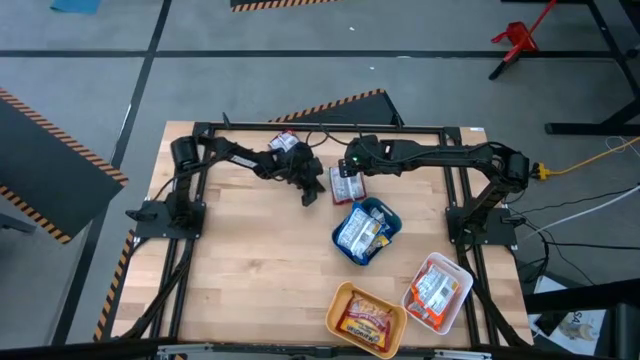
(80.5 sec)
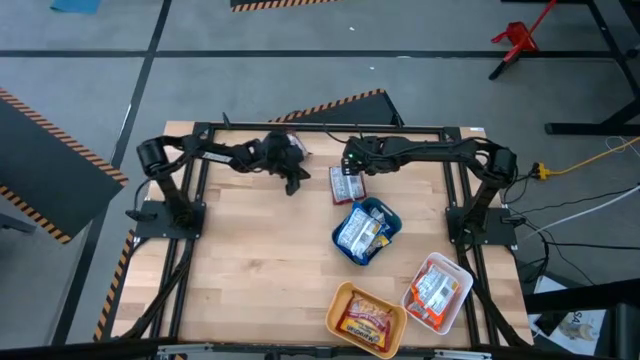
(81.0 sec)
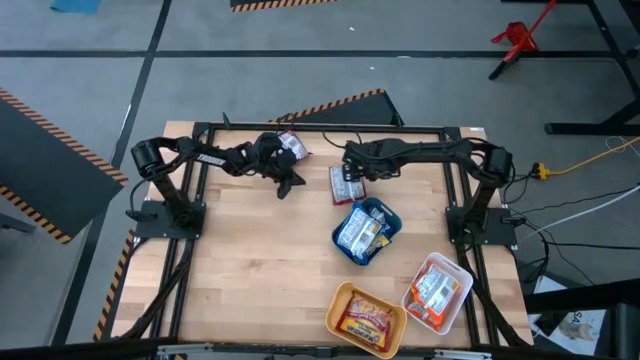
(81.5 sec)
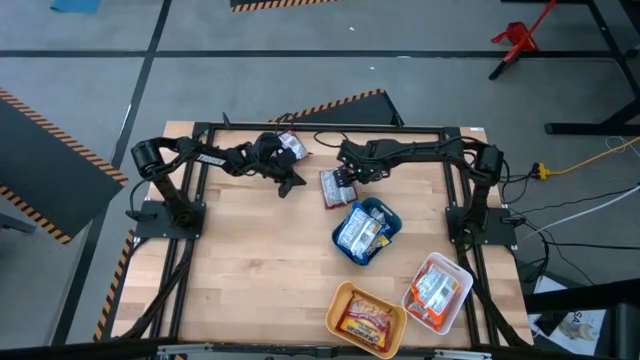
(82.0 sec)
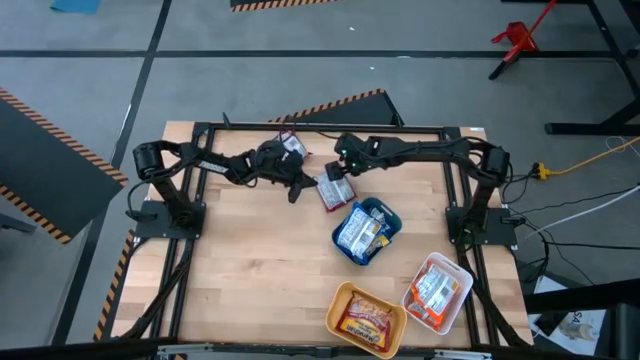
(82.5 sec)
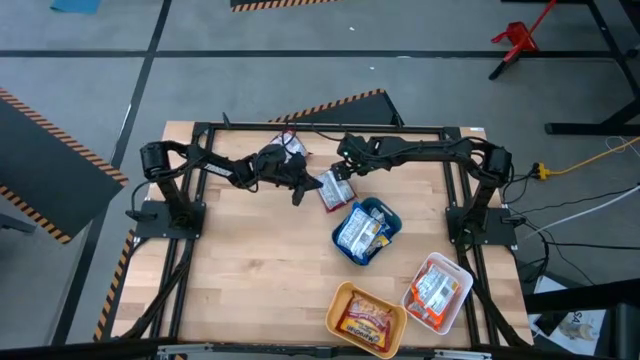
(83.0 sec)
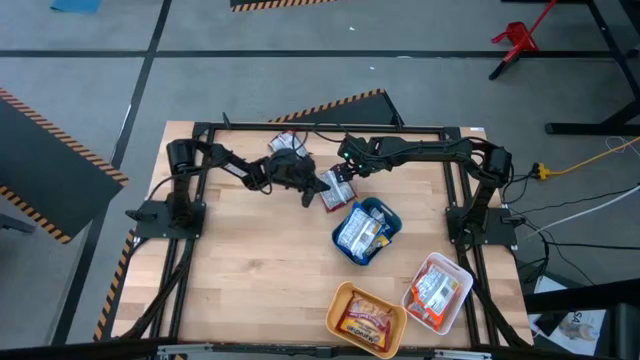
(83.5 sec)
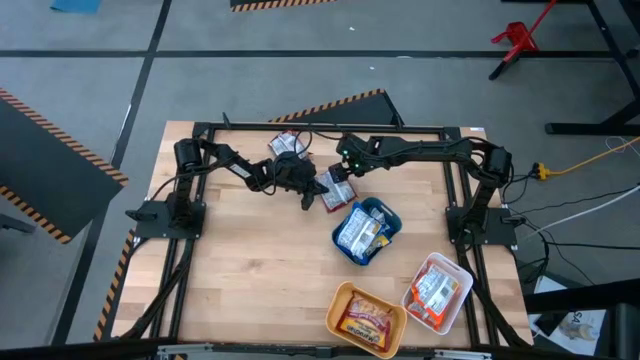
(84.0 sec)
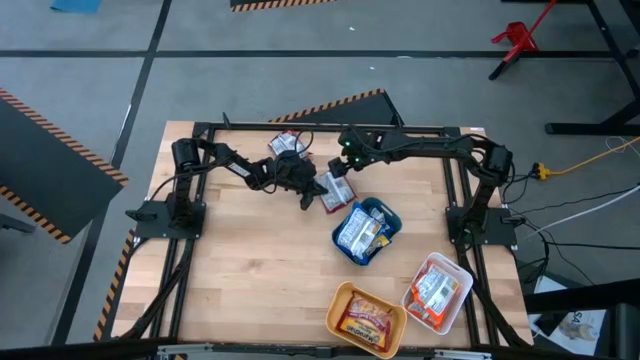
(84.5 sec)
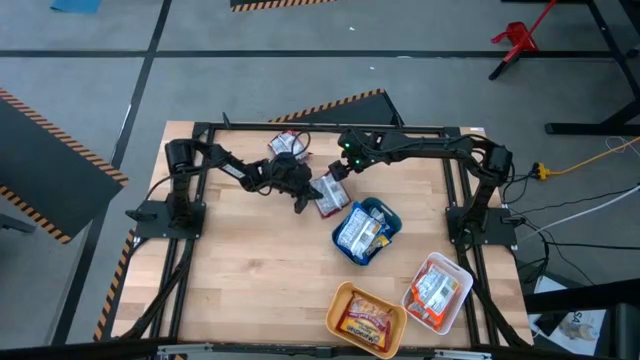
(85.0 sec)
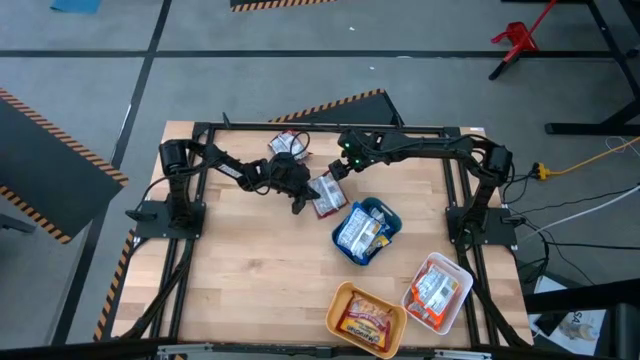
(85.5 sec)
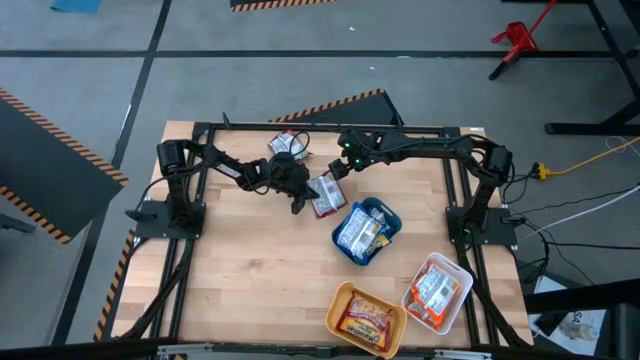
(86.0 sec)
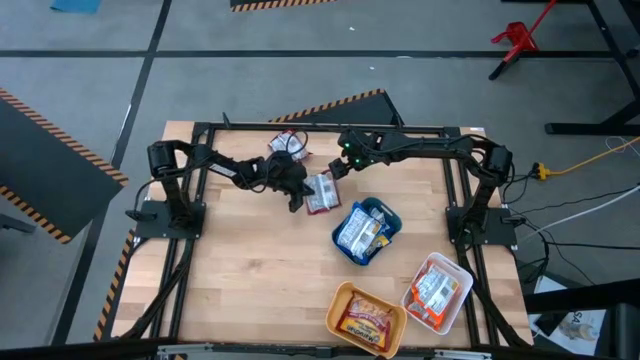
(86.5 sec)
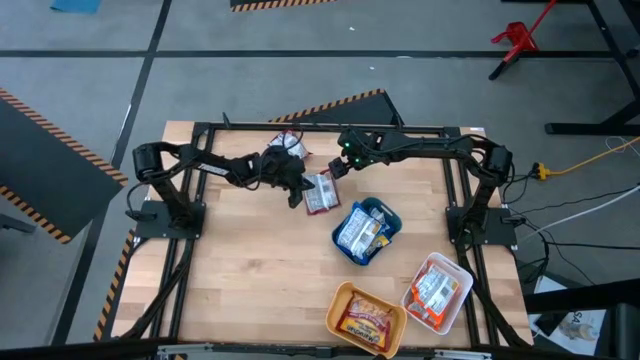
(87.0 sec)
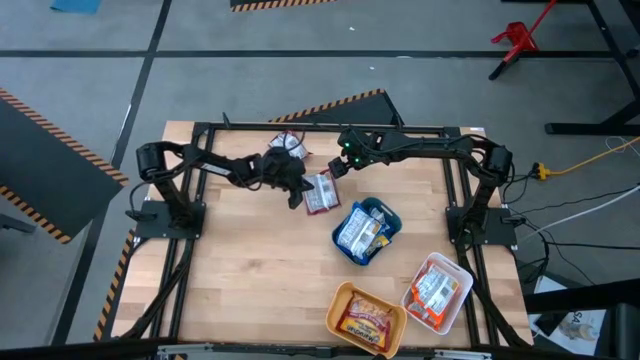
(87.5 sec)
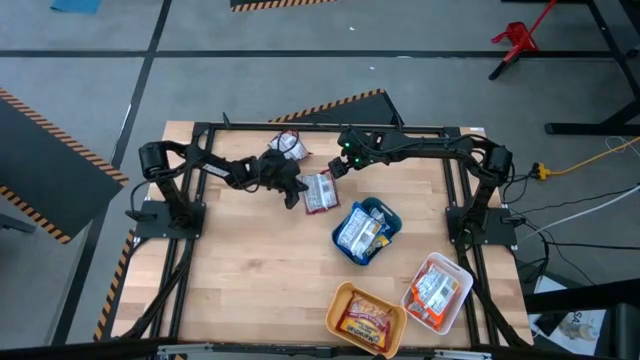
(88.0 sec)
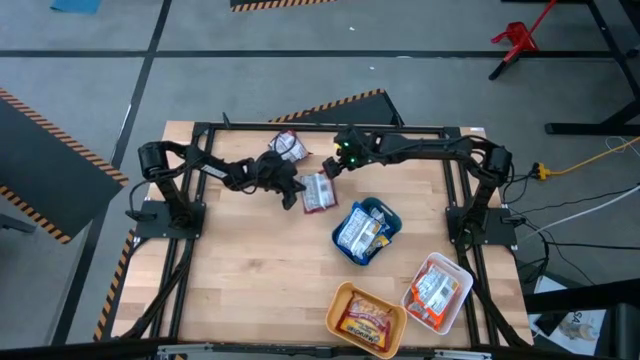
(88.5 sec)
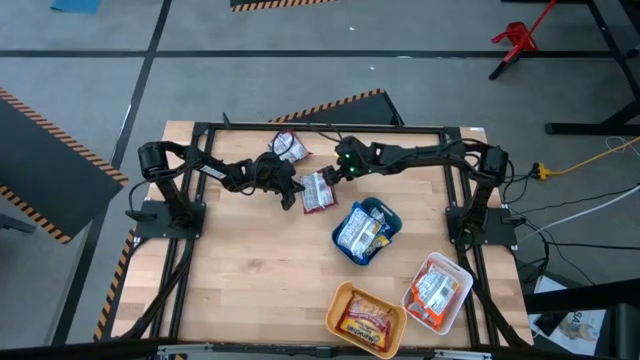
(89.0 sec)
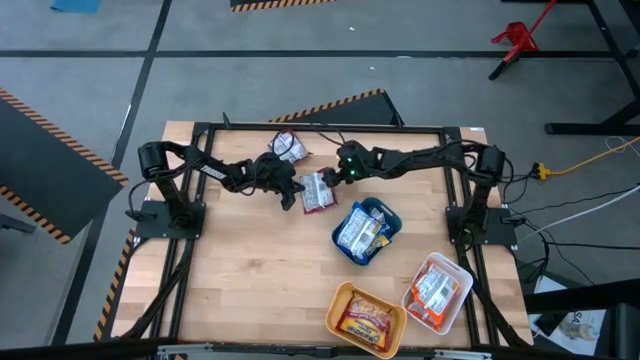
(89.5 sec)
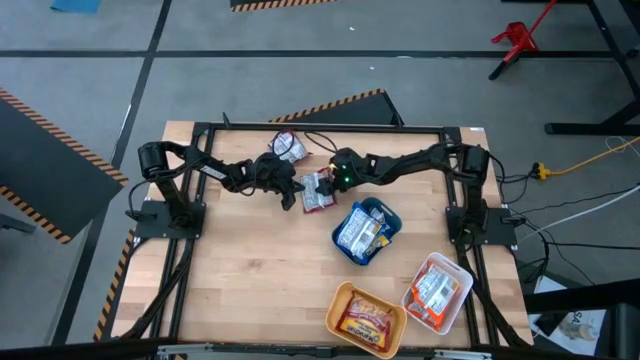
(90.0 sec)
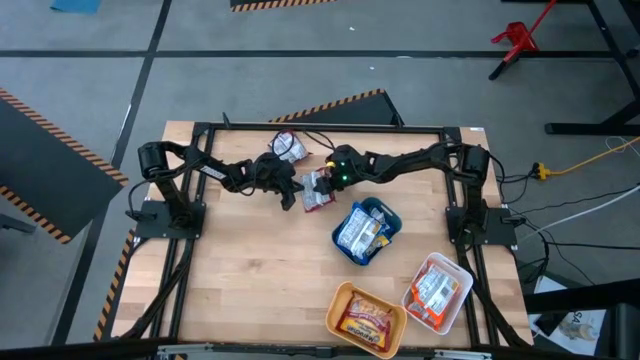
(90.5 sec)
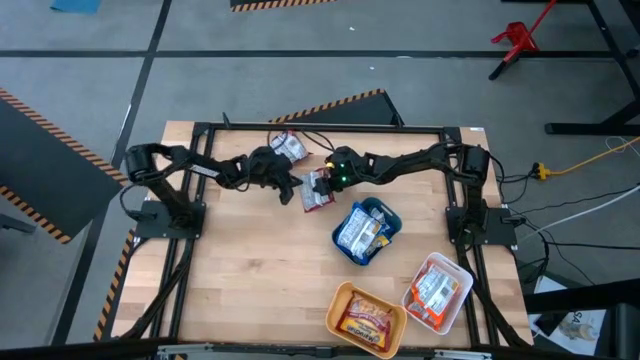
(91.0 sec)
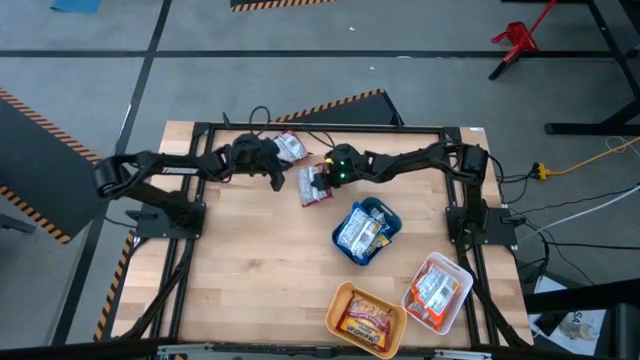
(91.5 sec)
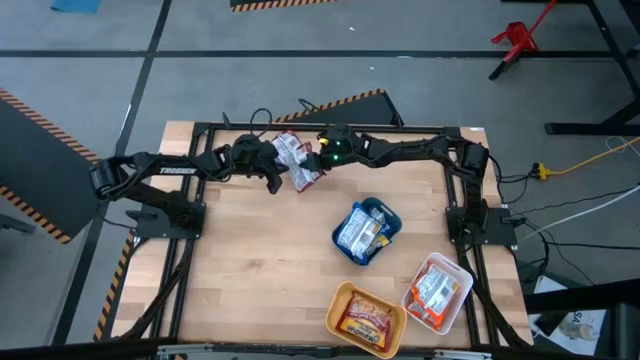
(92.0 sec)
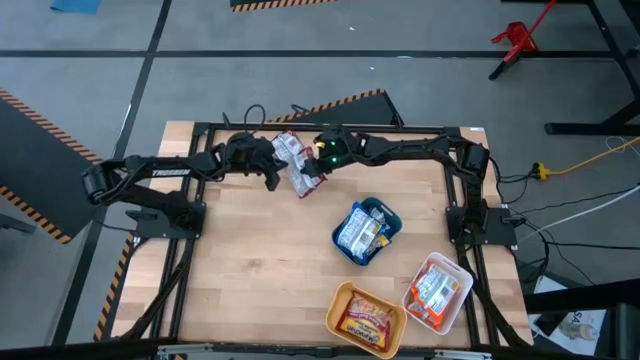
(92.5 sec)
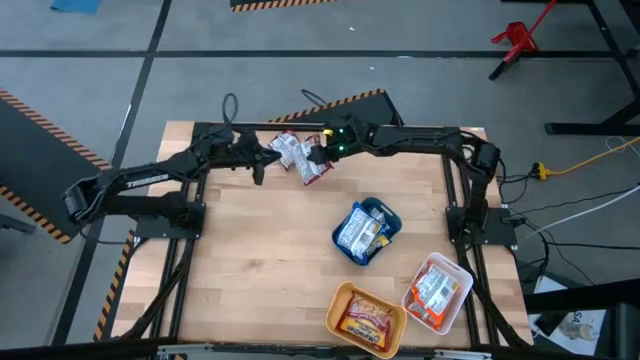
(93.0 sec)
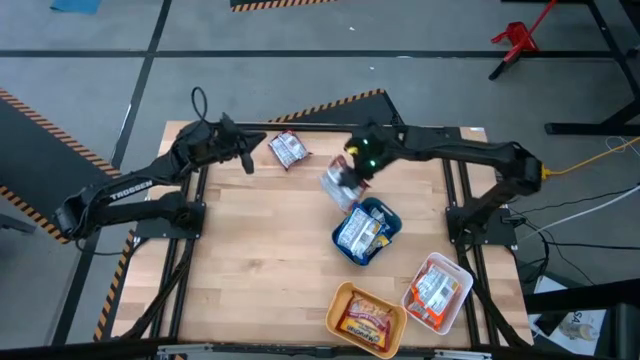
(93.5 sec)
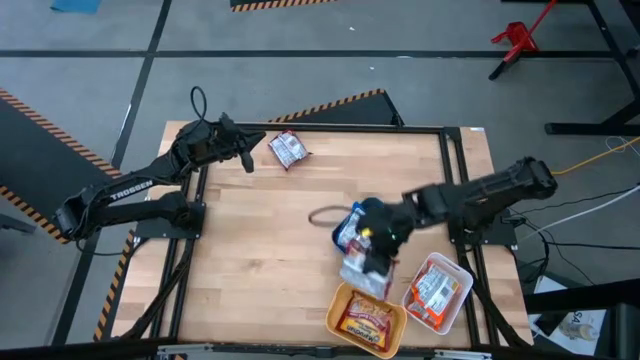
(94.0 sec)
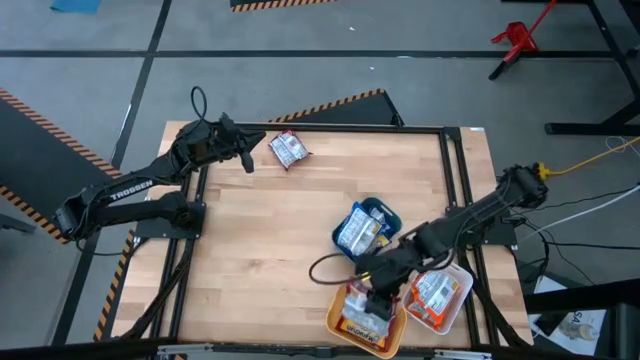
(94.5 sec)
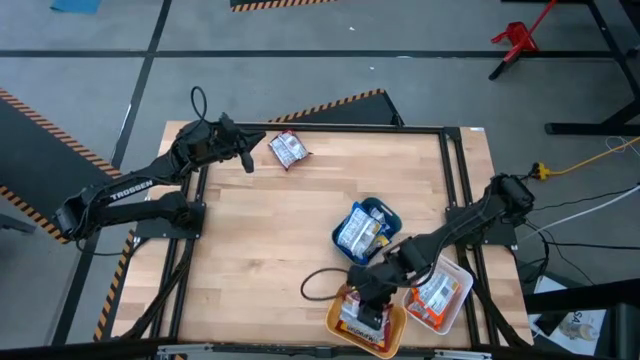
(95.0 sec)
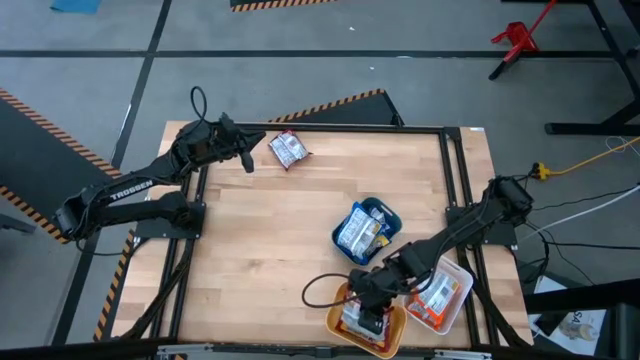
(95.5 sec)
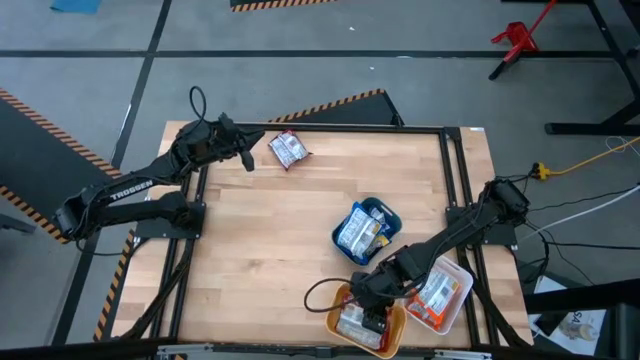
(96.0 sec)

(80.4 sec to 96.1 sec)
Task: Sort Maruchan noodles
Put the right red noodle pack into the yellow bin

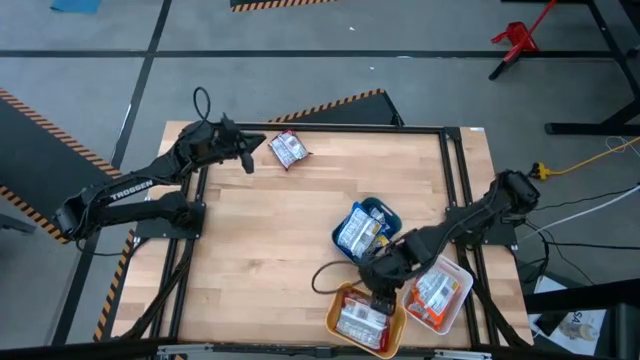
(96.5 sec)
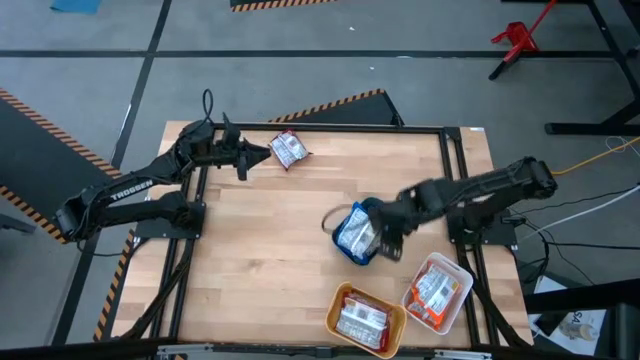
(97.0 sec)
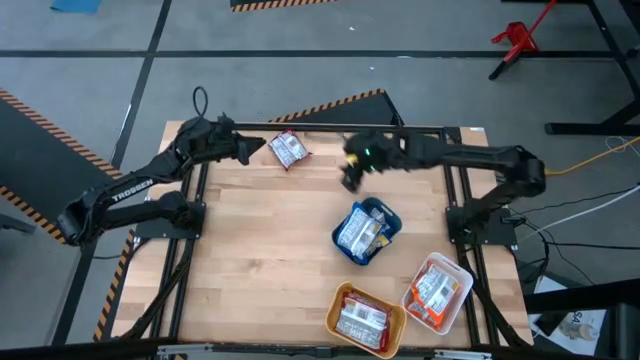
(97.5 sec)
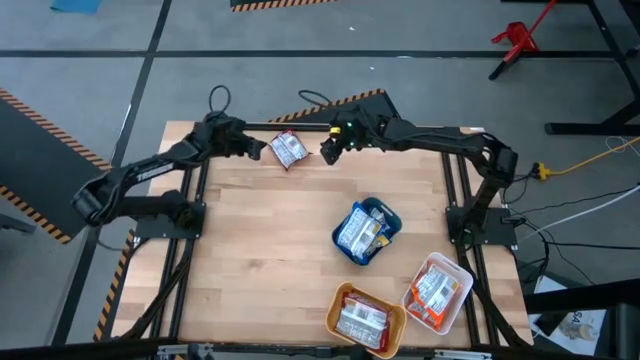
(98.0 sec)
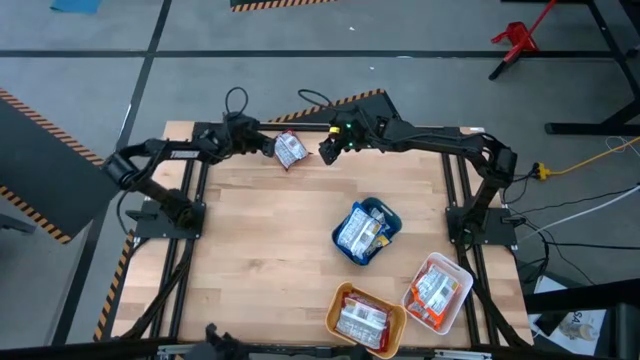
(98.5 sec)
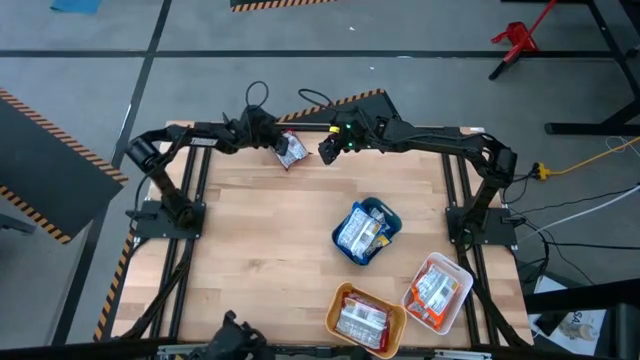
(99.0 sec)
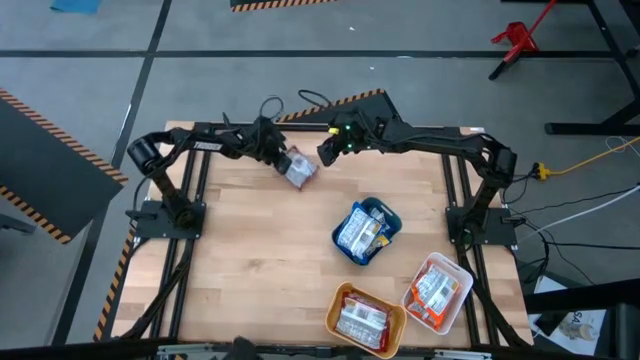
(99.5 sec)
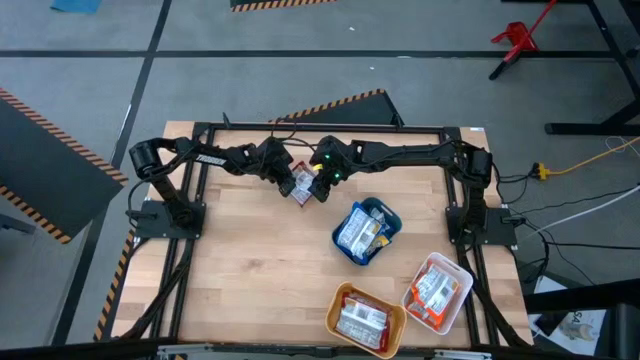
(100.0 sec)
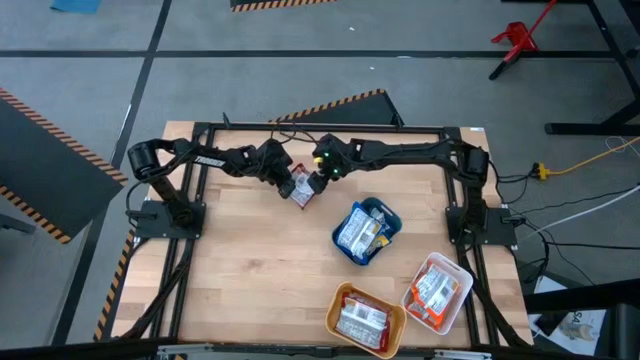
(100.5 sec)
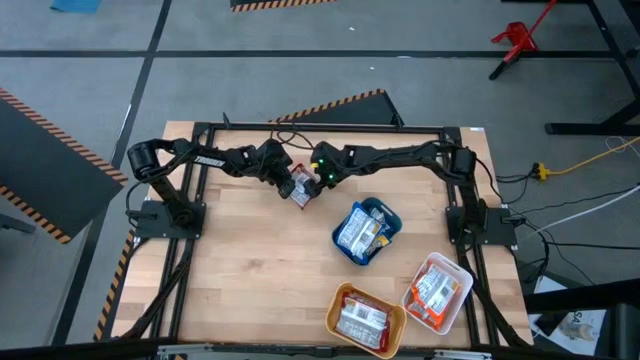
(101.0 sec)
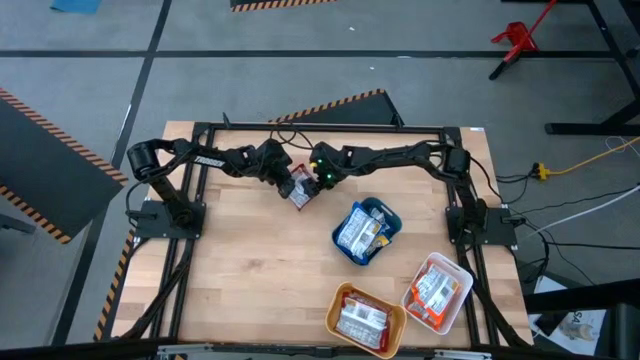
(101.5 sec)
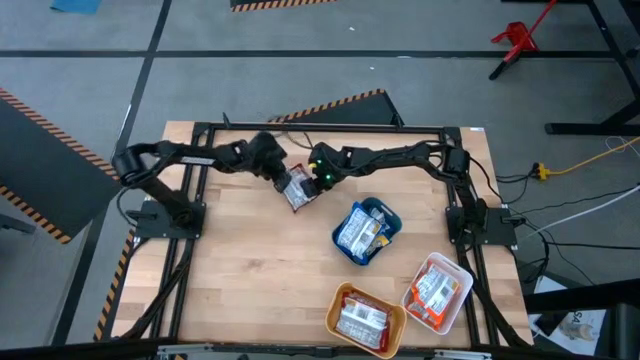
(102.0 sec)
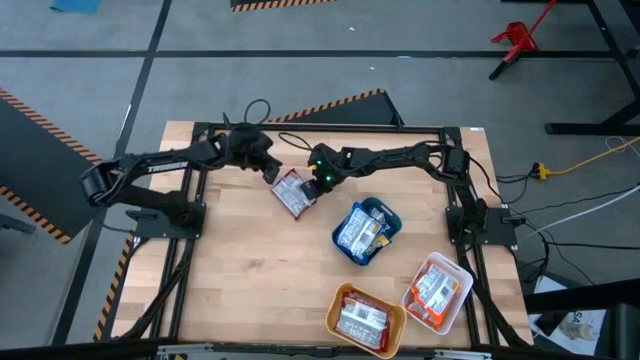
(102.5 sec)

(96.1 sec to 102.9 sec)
Put the red noodle pack into the yellow bin
